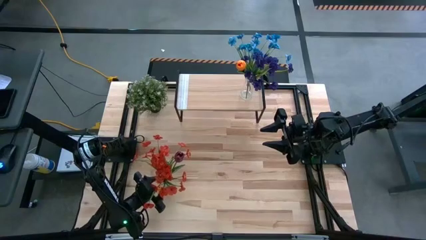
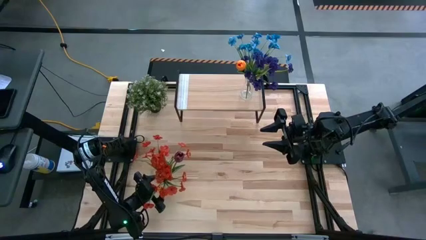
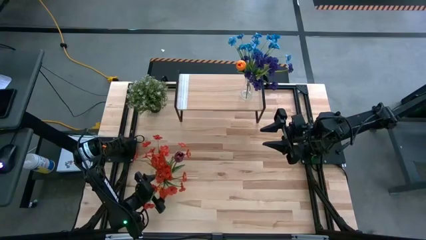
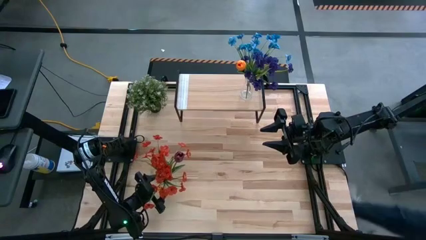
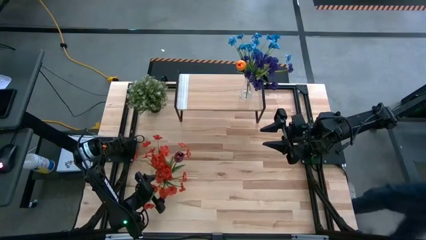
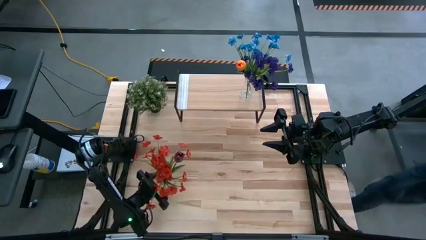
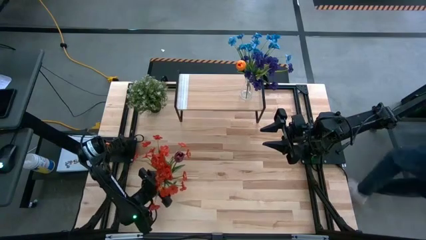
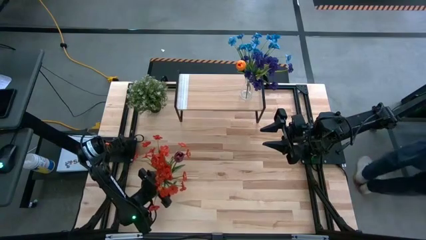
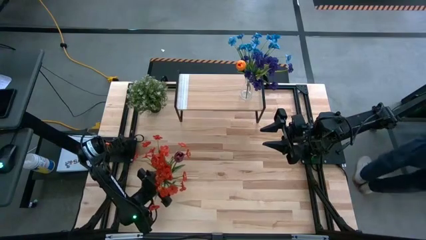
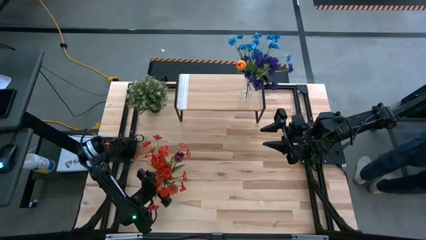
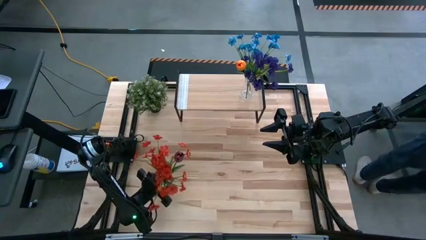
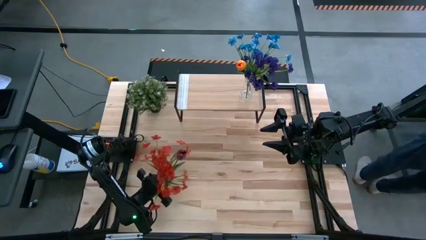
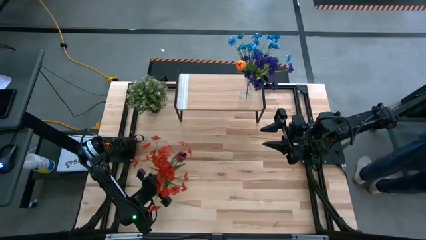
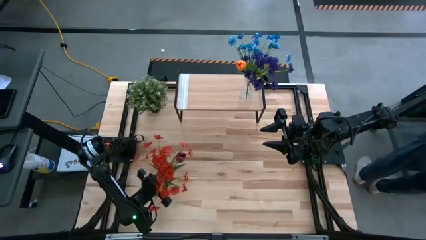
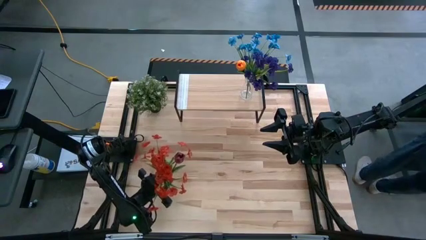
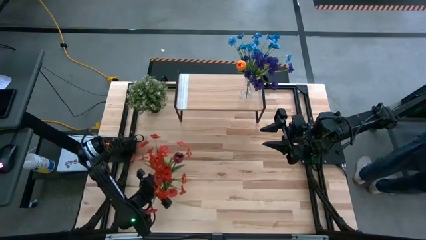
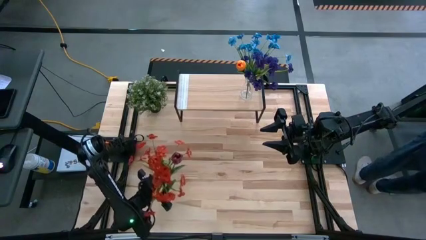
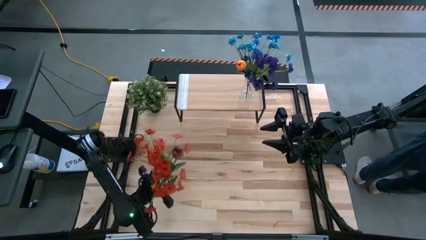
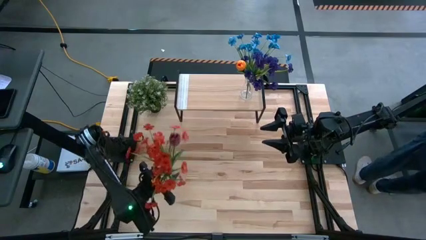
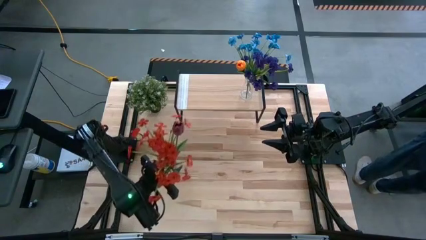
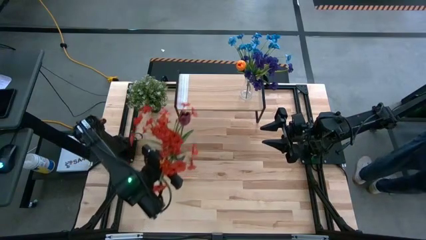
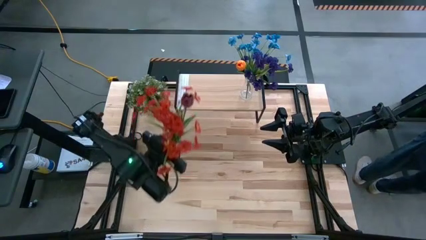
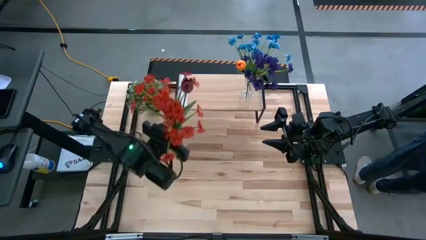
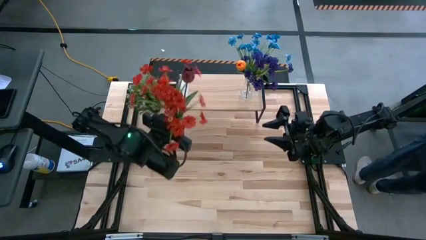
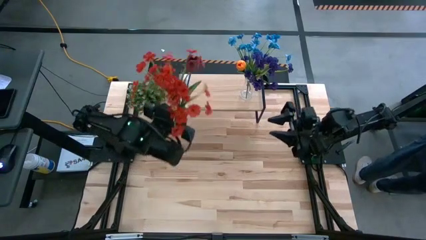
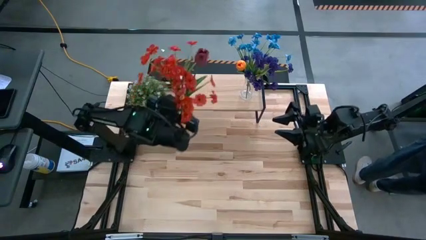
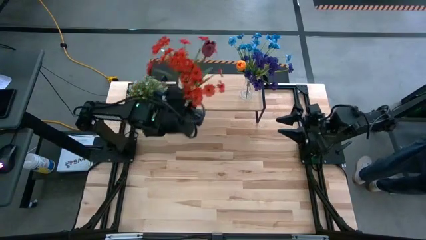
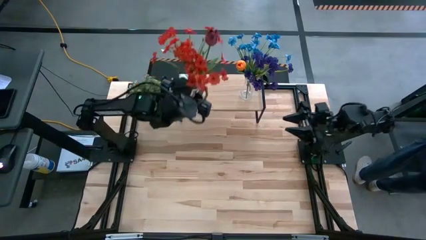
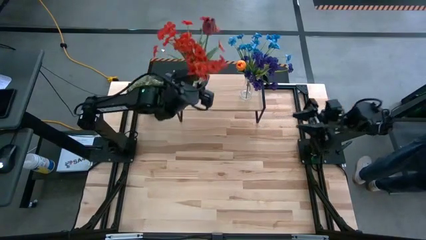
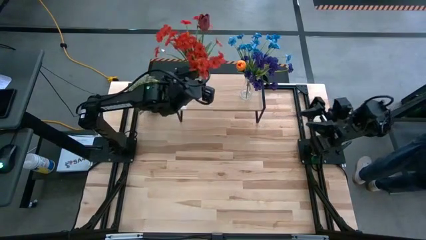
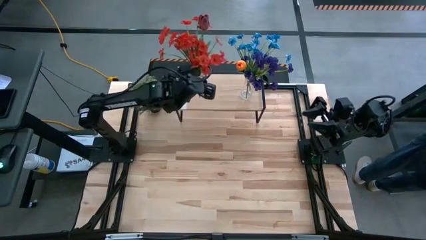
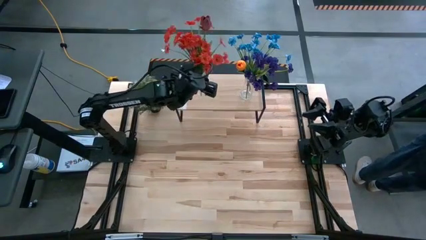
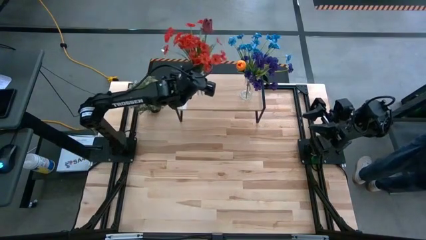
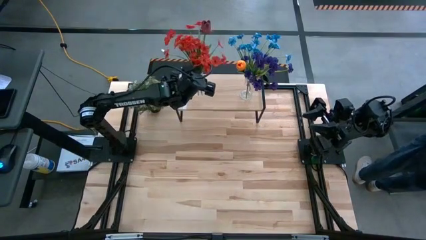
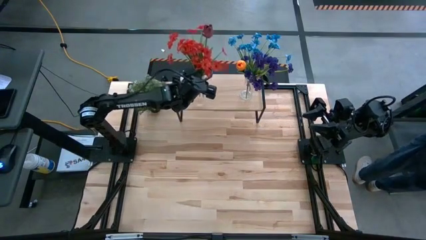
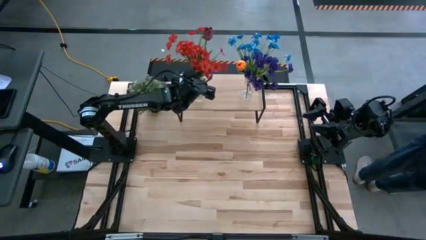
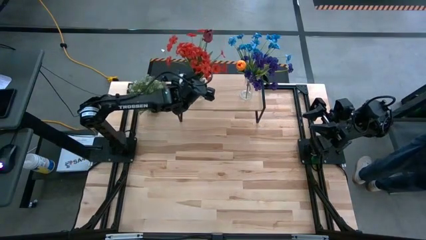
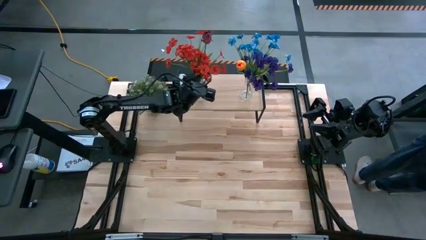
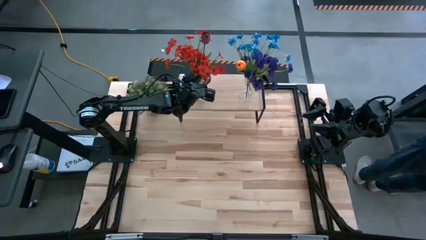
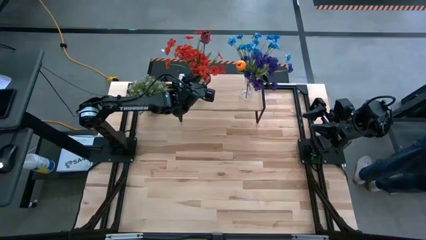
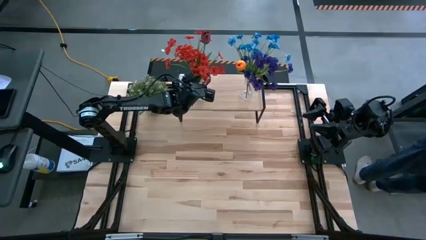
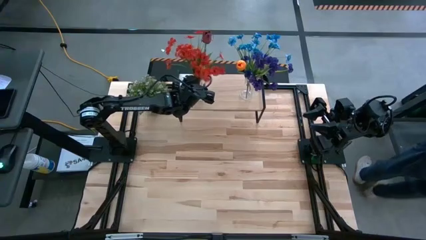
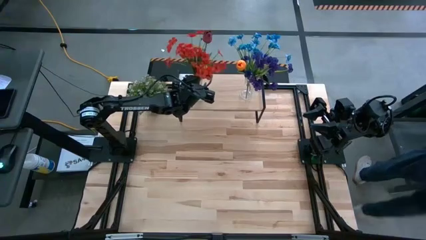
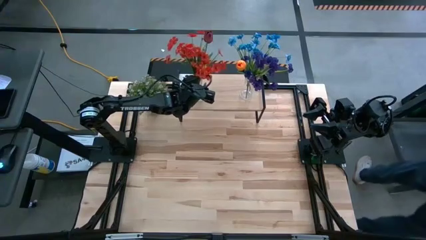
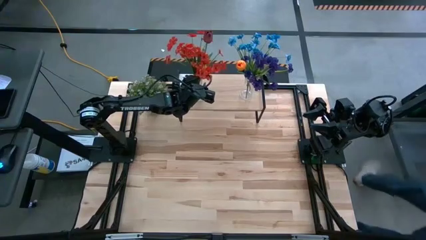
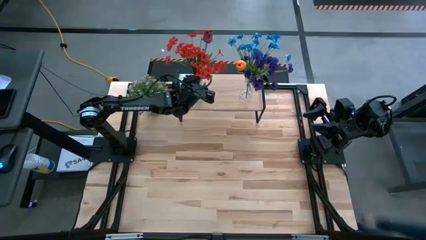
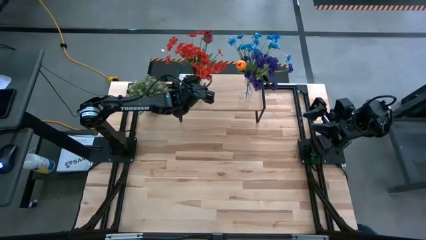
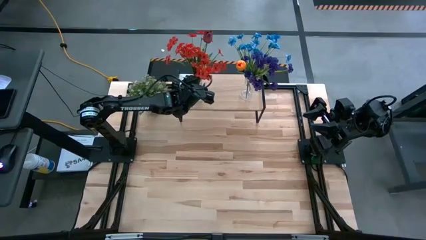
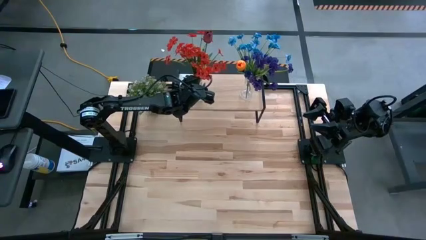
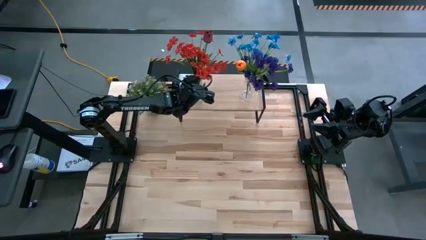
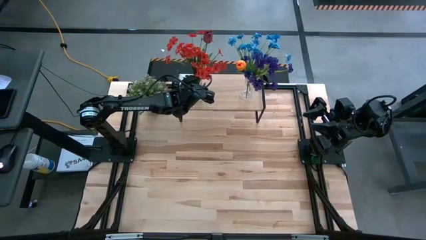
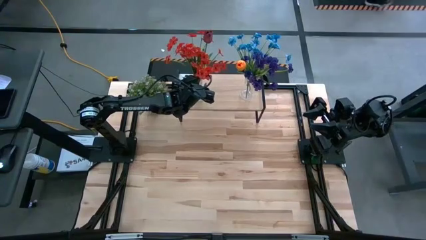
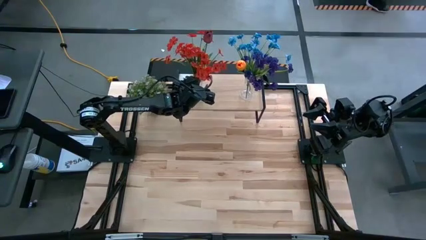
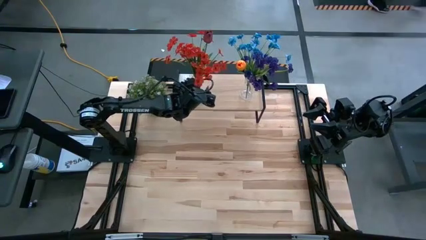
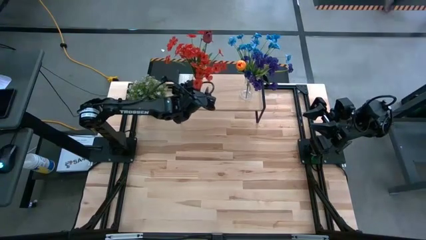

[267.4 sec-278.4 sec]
Task: Pick and place flowers into a vace then onto a shelf
Put the transparent vase with flowers on the shelf
